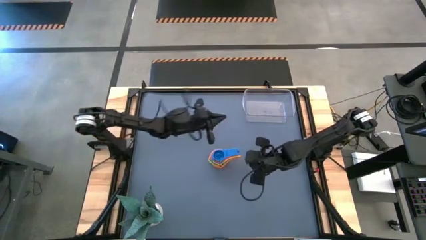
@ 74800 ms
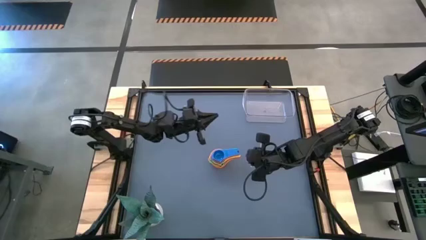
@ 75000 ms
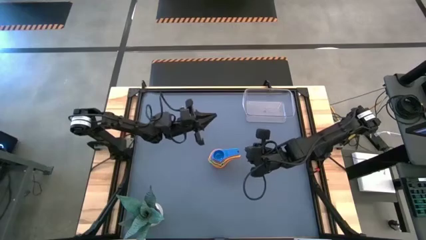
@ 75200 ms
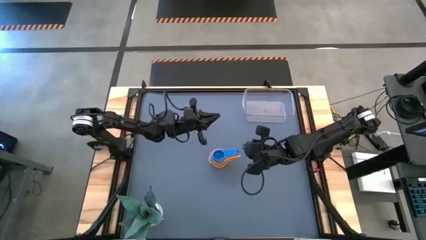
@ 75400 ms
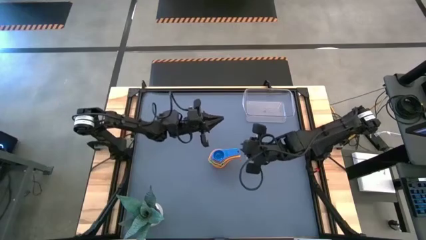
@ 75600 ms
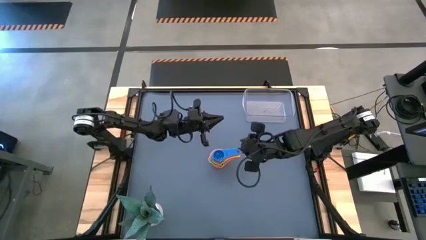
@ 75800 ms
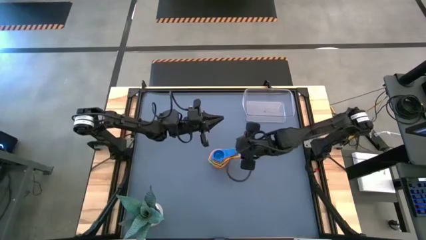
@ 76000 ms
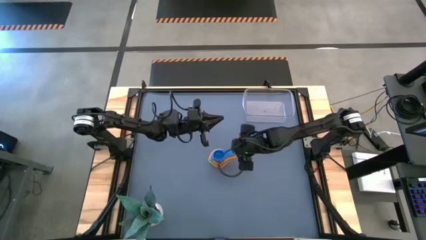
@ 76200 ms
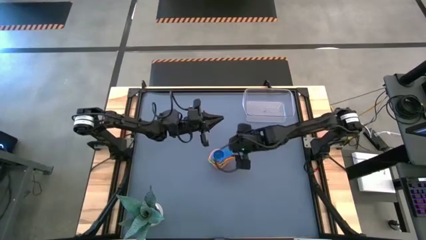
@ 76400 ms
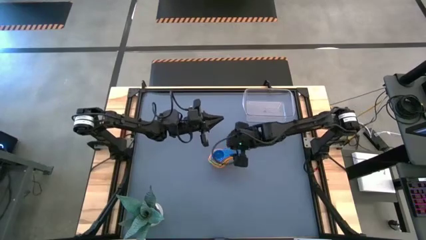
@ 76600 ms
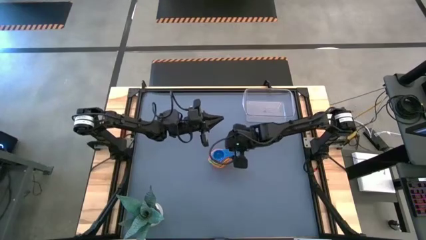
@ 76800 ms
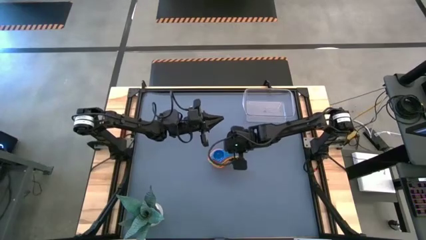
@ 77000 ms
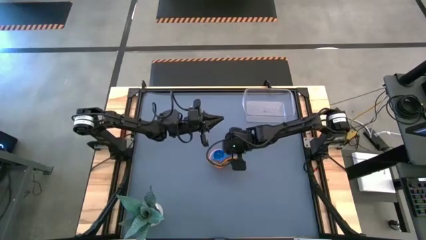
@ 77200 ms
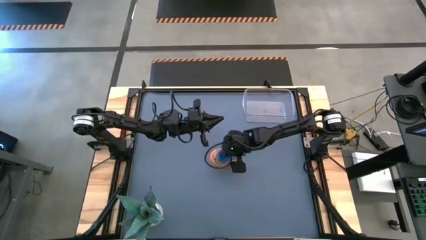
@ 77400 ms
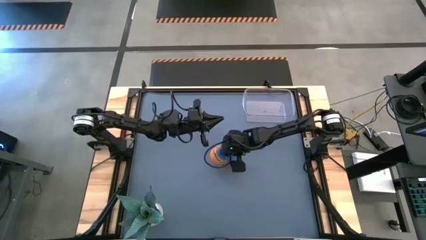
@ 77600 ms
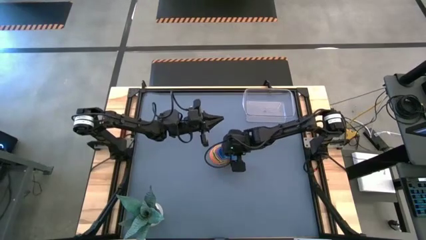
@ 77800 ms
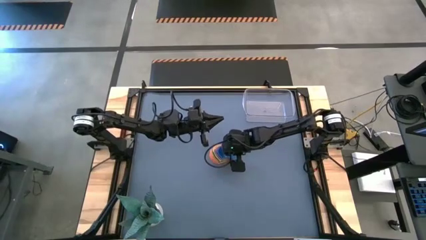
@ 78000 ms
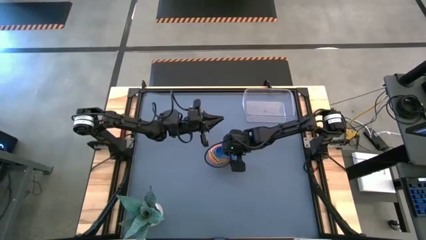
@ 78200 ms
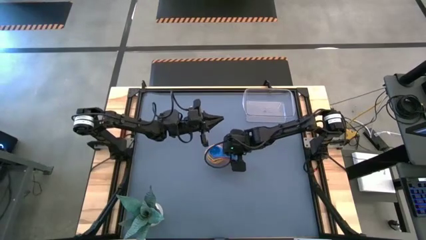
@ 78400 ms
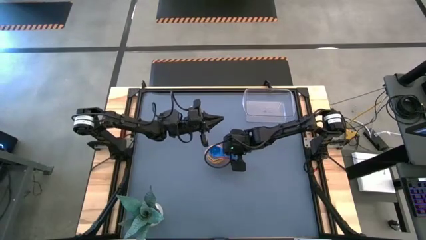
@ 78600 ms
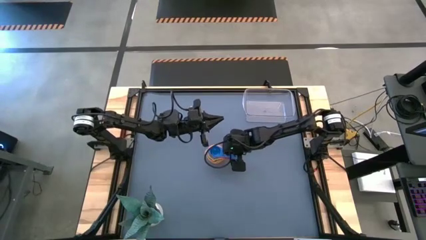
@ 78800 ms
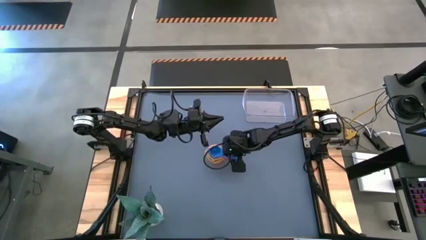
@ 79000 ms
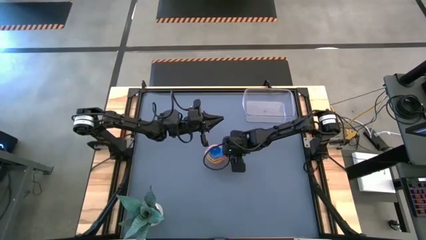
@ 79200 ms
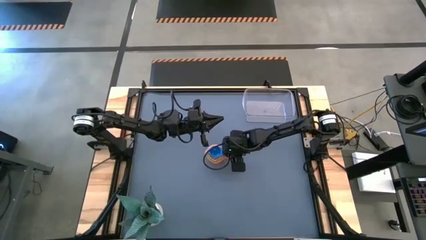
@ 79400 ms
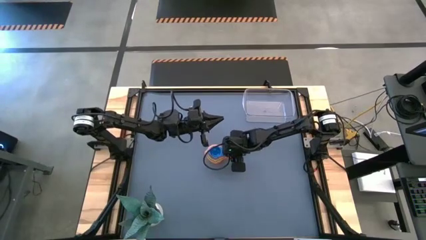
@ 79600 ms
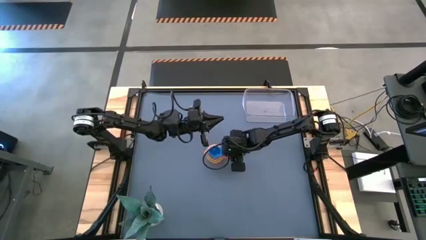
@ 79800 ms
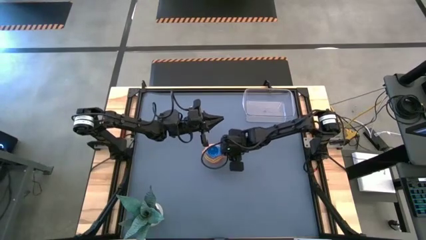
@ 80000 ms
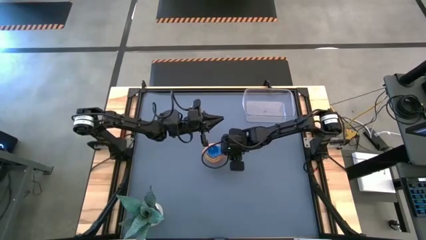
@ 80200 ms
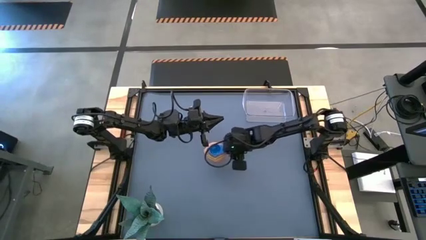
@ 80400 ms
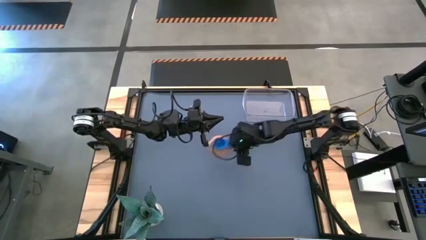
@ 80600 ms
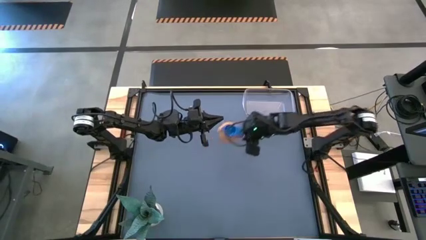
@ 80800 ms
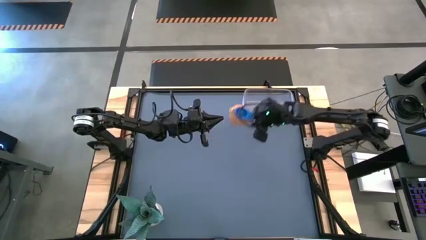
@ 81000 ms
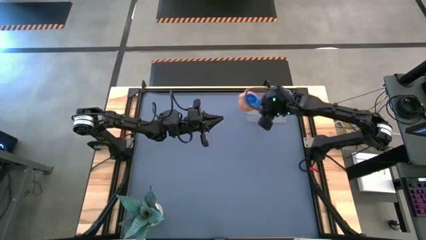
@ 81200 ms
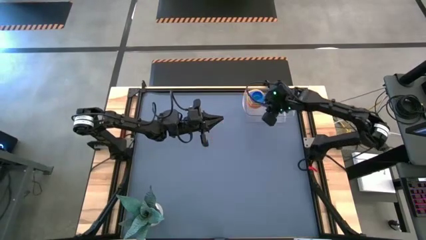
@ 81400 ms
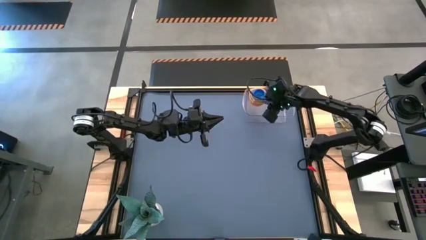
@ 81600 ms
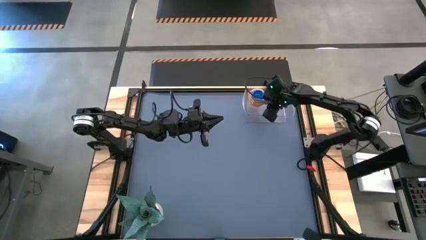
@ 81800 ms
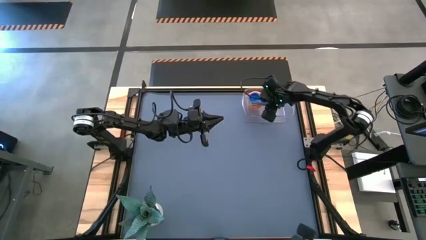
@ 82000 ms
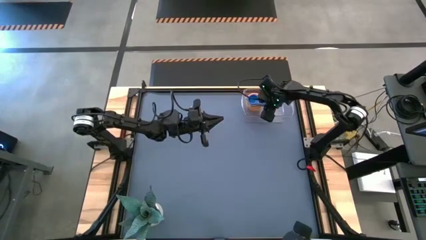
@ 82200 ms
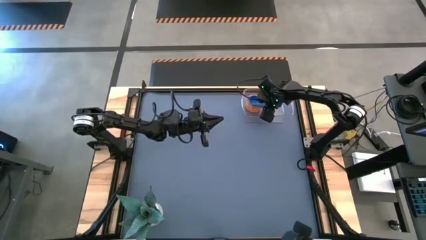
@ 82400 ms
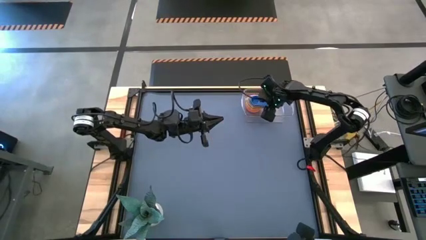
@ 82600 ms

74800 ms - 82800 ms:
Task: Nest measuring cups in basket
Put the nested measuring cups on top of the transparent bin

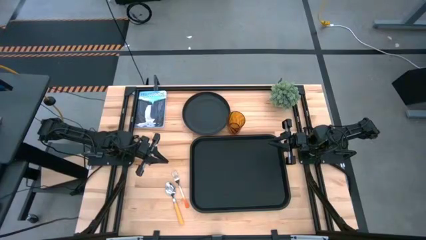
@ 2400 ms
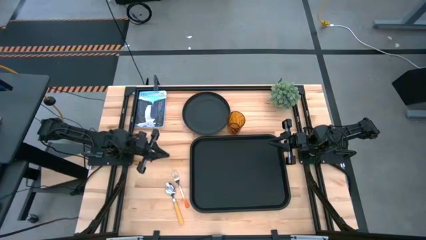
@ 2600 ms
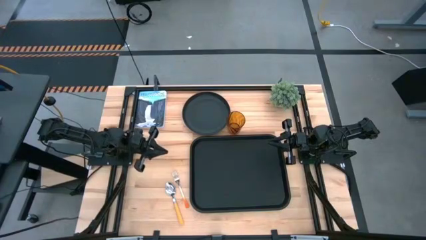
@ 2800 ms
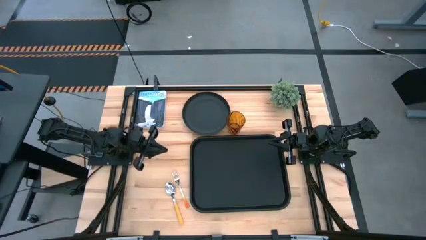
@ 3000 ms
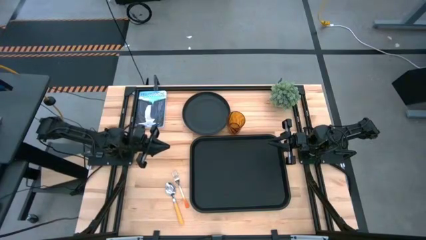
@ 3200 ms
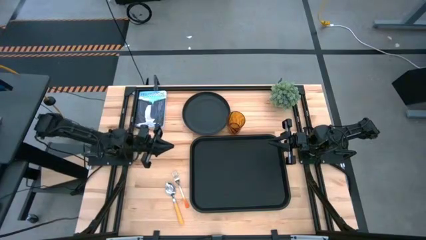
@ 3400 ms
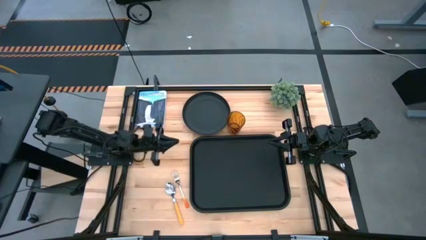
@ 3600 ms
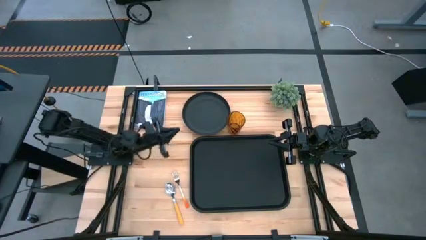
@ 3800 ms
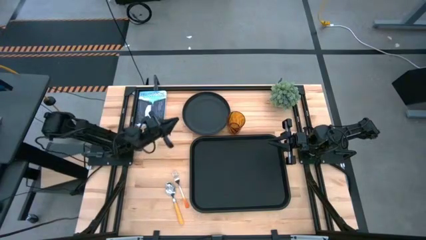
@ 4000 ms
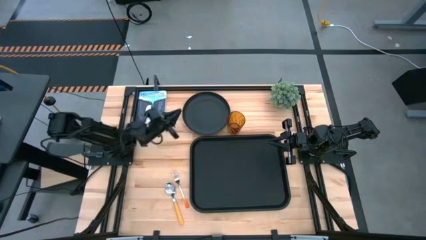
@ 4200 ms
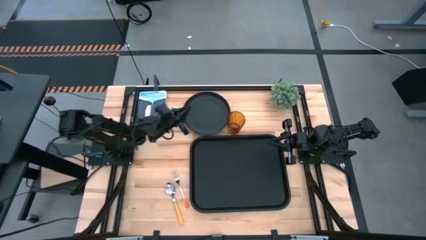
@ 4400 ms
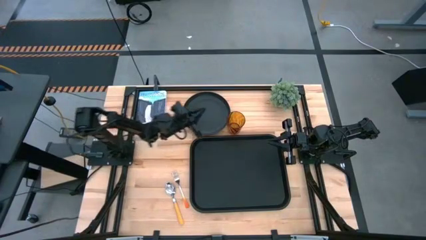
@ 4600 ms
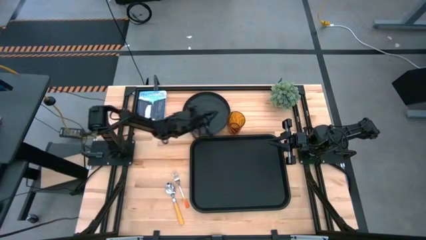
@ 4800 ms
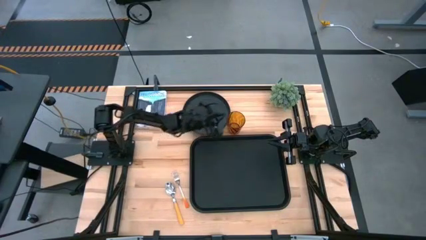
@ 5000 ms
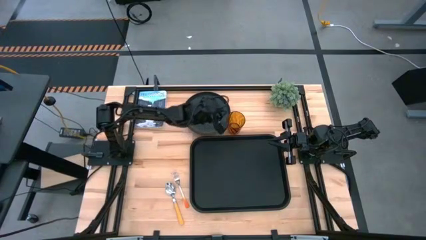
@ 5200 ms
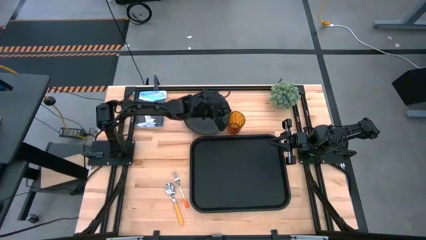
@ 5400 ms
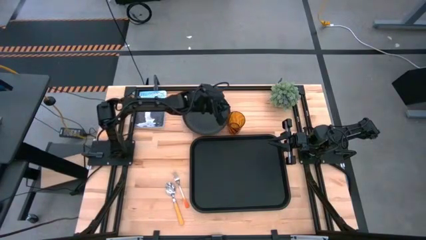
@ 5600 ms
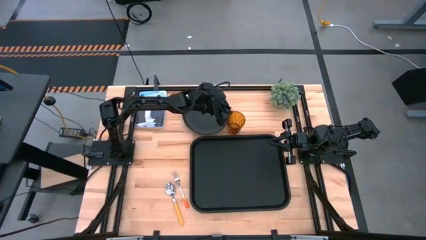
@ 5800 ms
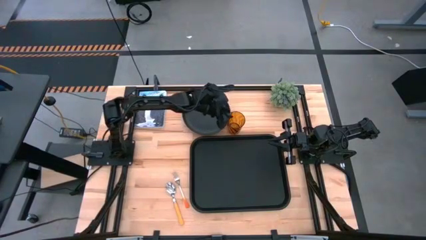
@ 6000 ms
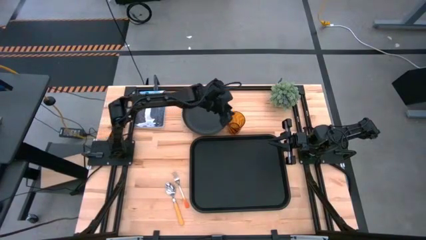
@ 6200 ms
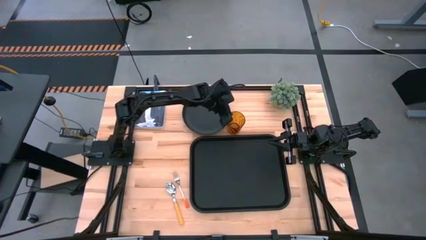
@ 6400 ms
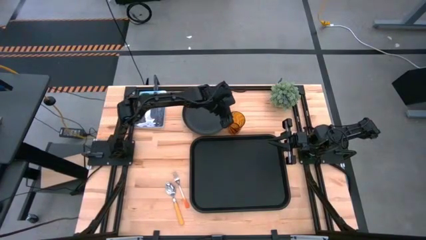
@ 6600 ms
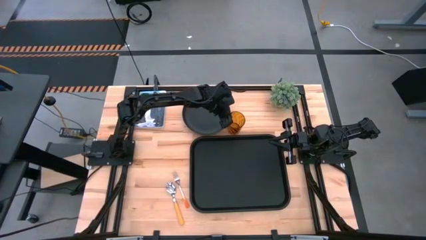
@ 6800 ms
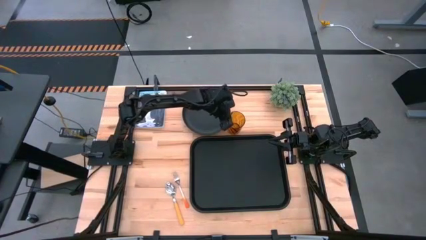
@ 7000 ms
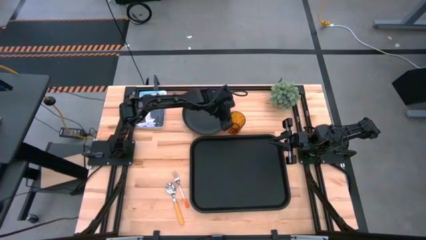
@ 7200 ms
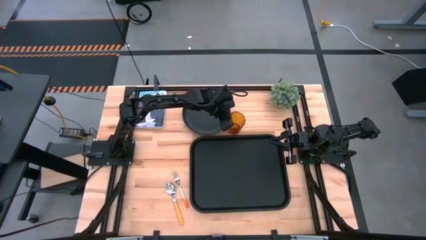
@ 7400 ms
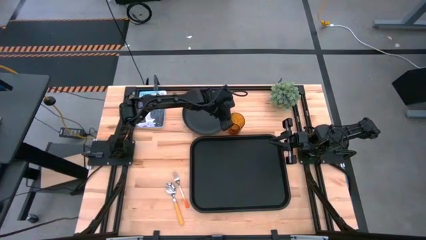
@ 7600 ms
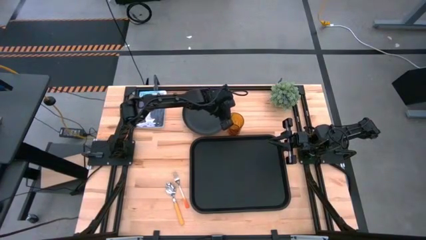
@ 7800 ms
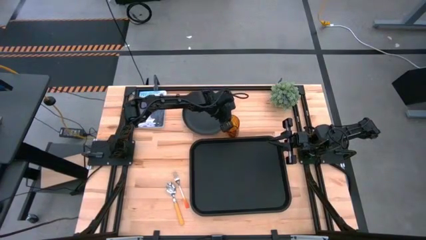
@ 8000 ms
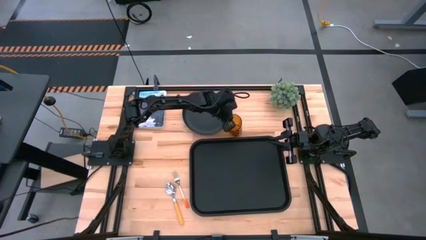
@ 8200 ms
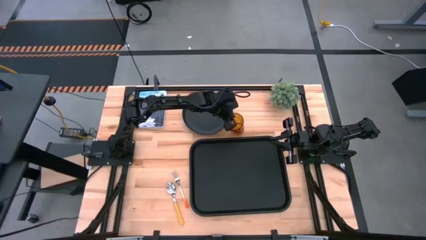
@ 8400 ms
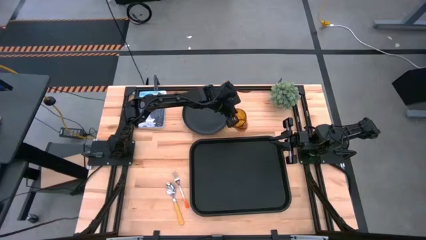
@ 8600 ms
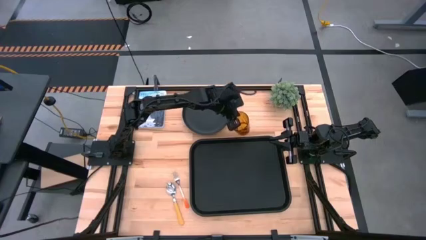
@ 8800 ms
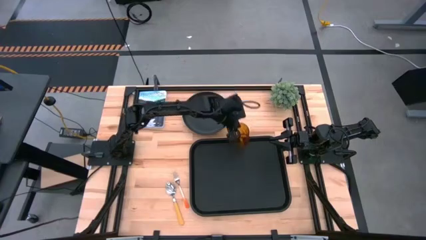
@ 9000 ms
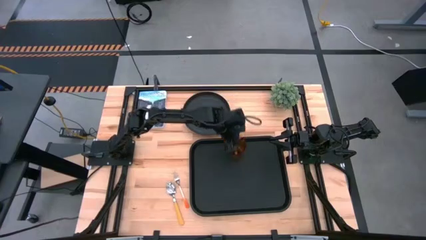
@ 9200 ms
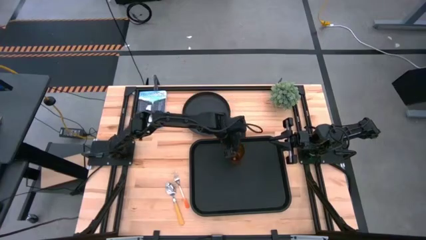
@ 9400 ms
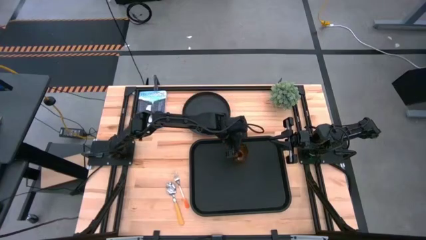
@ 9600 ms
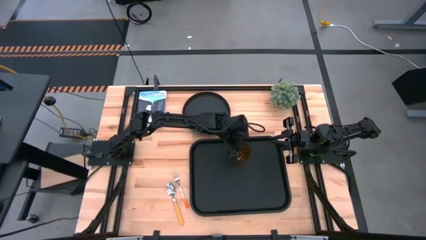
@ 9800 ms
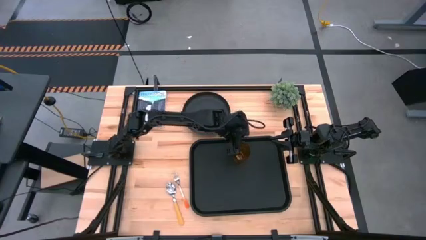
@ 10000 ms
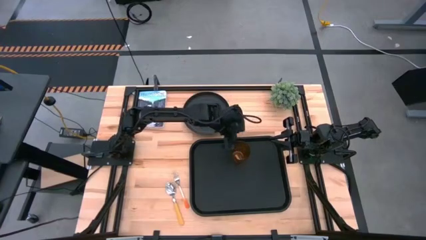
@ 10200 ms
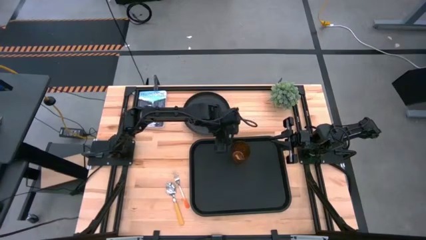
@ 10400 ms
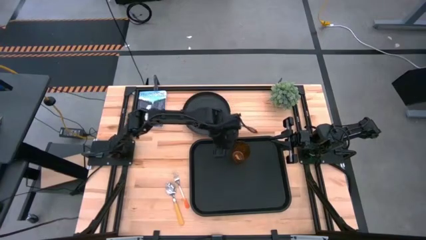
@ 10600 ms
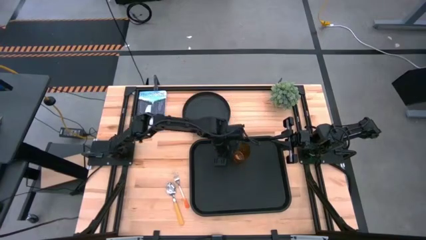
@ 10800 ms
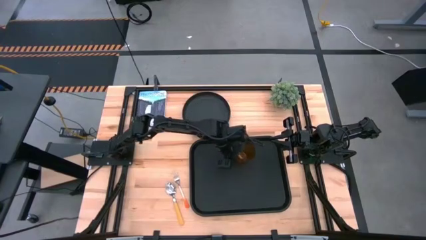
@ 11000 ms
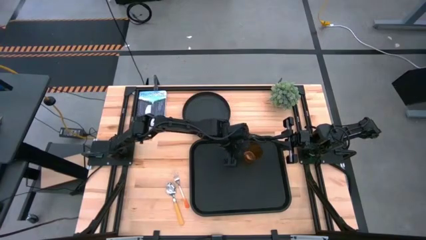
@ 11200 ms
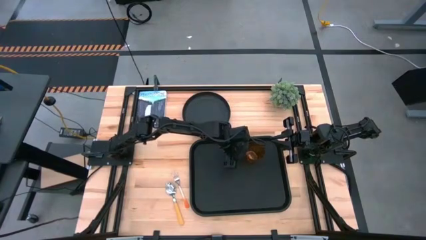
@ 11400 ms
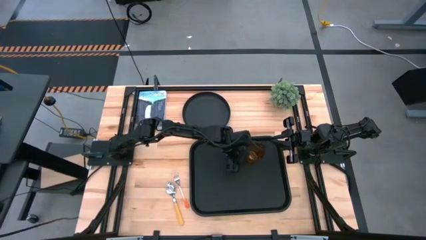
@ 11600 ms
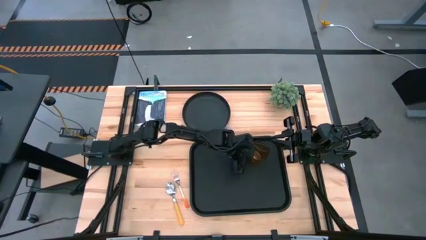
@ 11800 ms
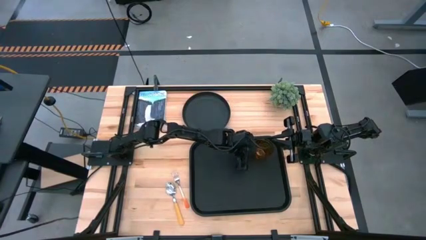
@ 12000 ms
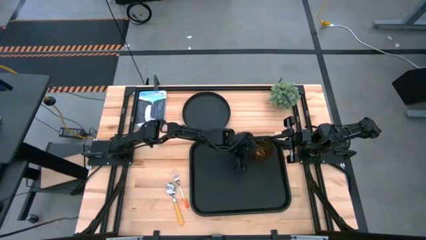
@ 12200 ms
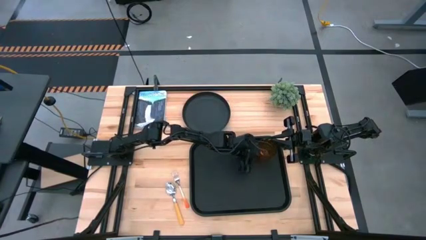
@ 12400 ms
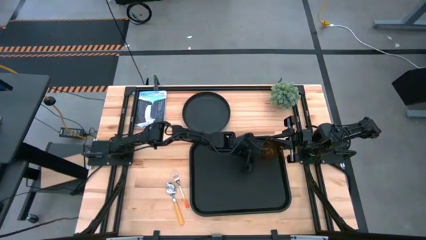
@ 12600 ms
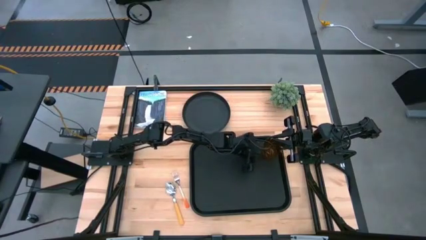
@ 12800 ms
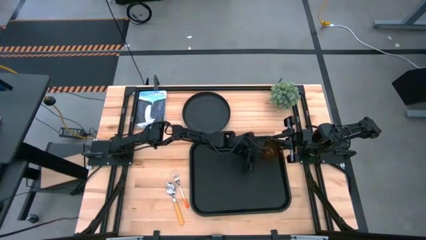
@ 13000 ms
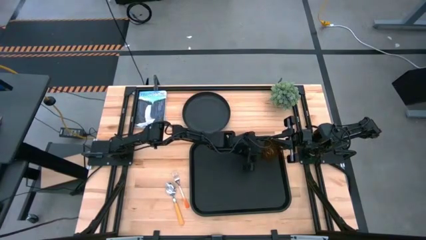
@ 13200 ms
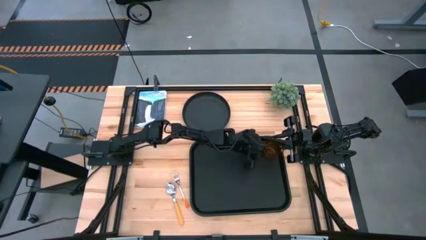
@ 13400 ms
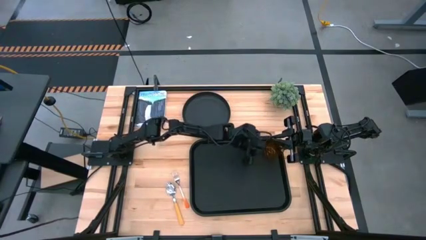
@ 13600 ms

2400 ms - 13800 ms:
Task: Pick and place plate/cup/fork/spoon on tray
Put the orange cup on the black tray in the top left corner
